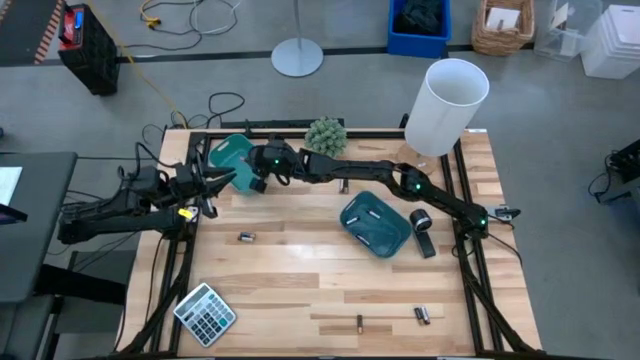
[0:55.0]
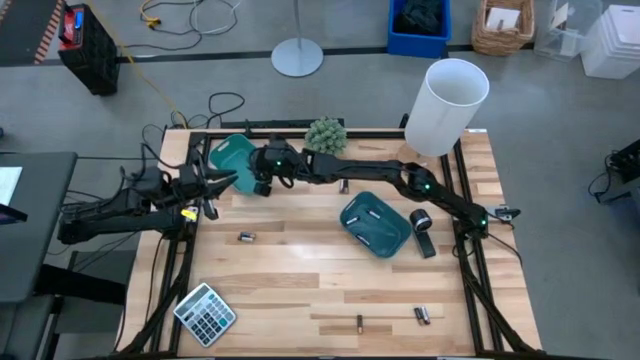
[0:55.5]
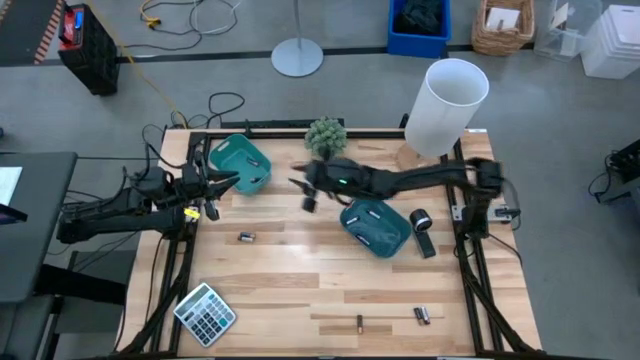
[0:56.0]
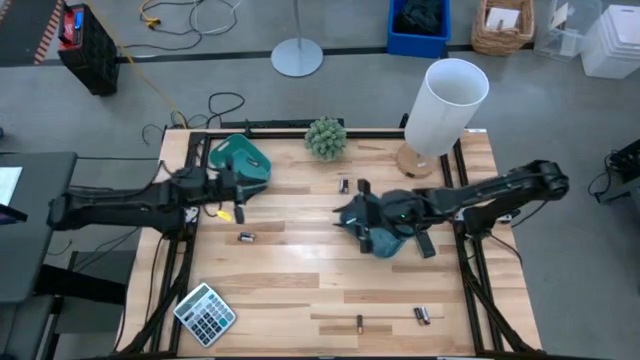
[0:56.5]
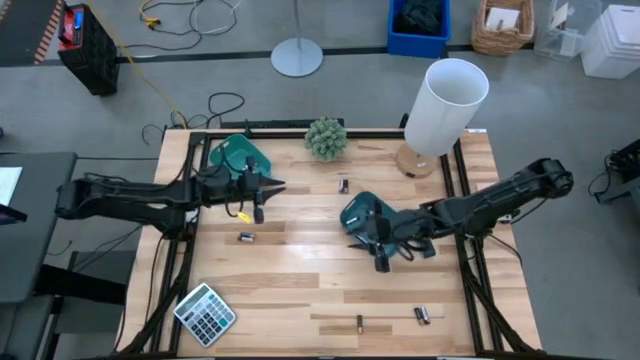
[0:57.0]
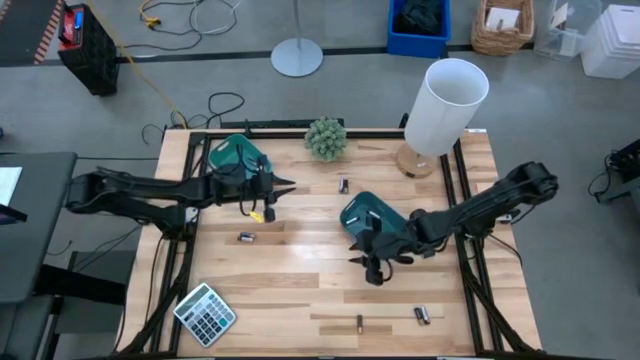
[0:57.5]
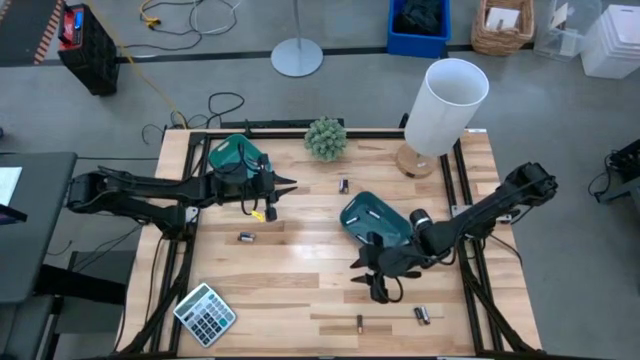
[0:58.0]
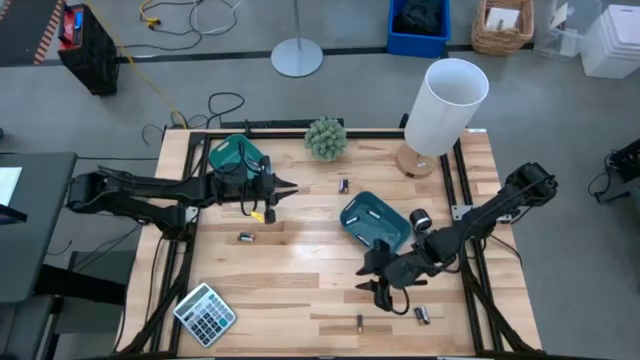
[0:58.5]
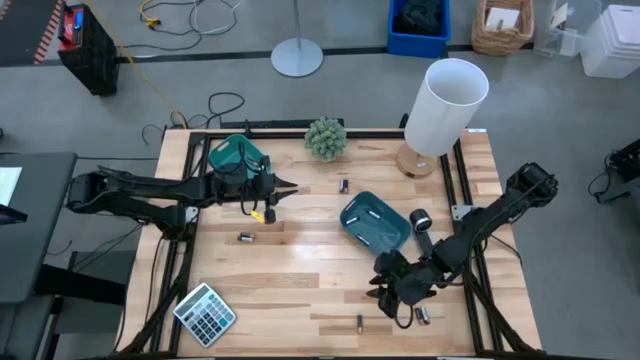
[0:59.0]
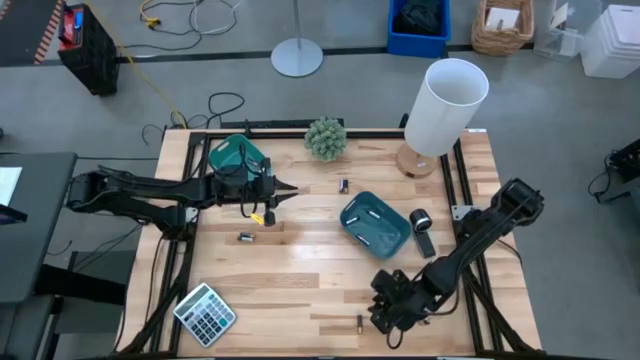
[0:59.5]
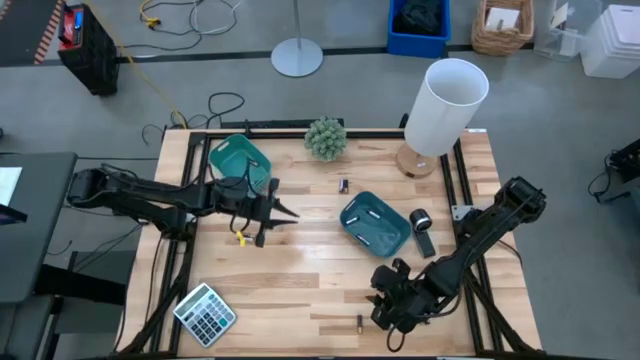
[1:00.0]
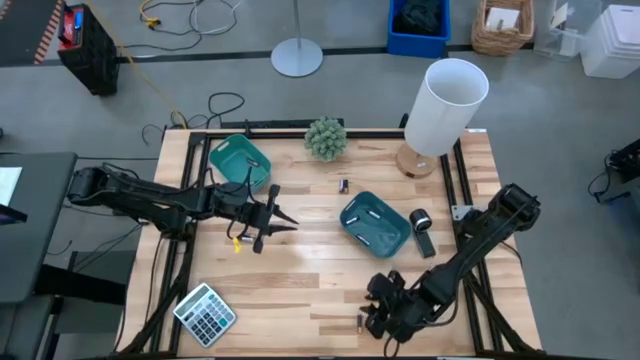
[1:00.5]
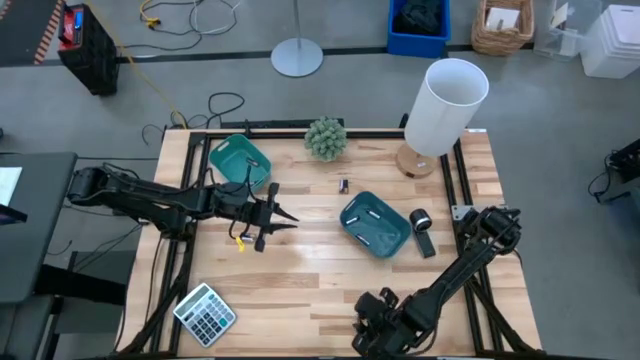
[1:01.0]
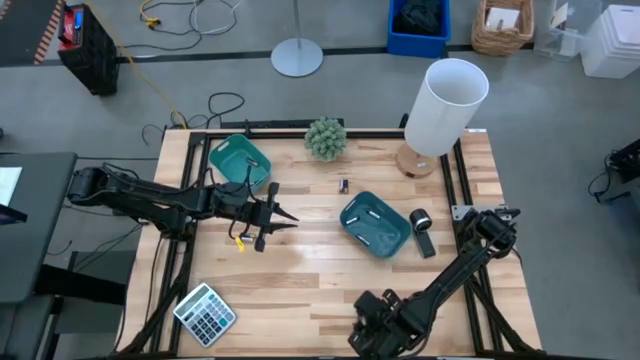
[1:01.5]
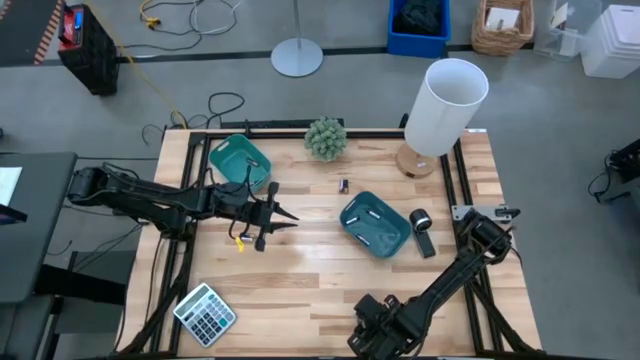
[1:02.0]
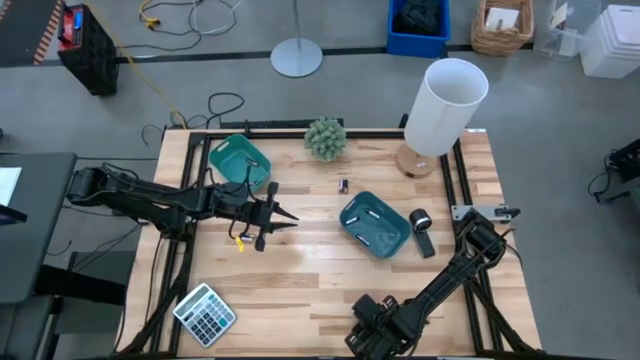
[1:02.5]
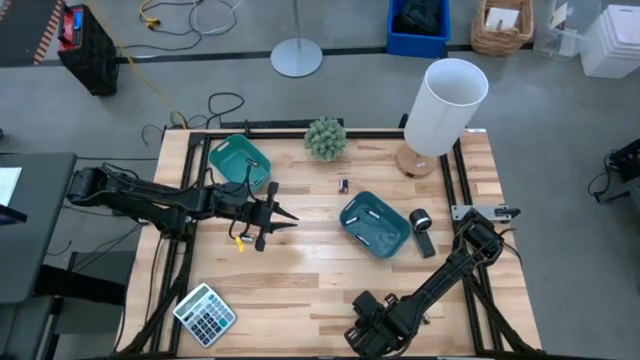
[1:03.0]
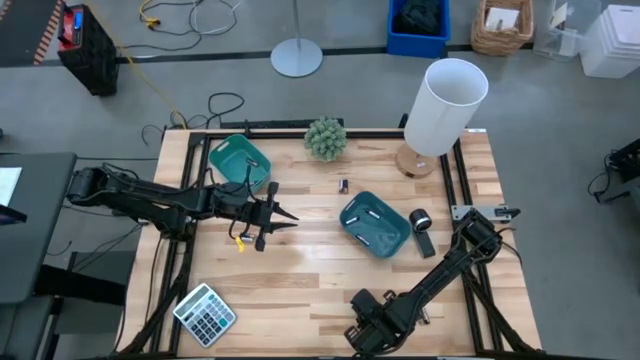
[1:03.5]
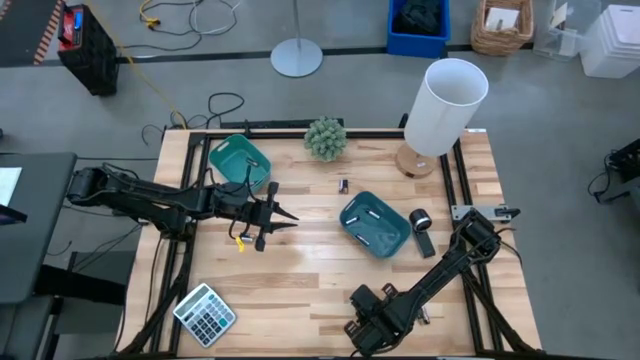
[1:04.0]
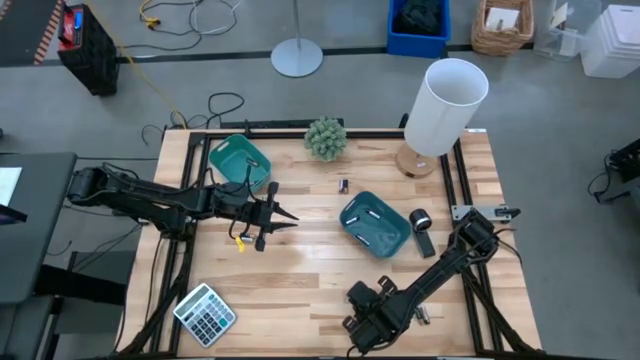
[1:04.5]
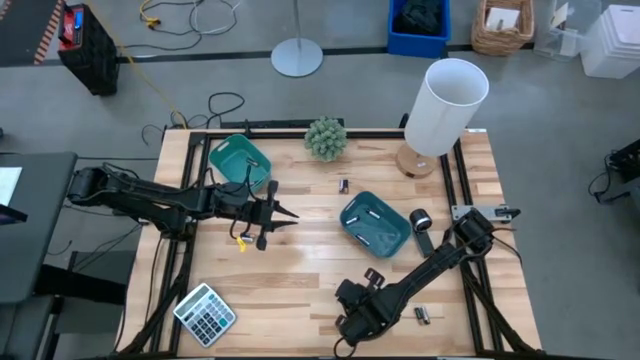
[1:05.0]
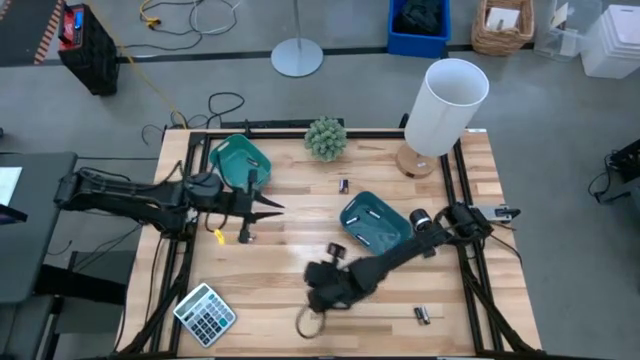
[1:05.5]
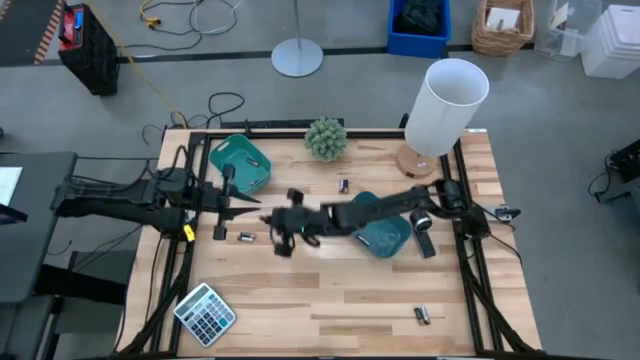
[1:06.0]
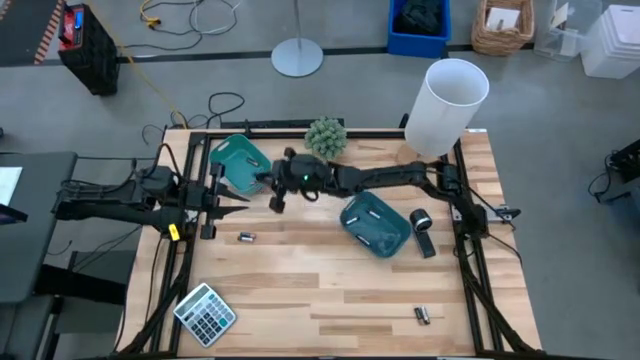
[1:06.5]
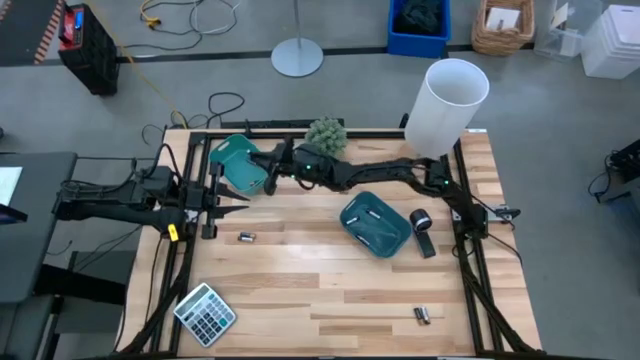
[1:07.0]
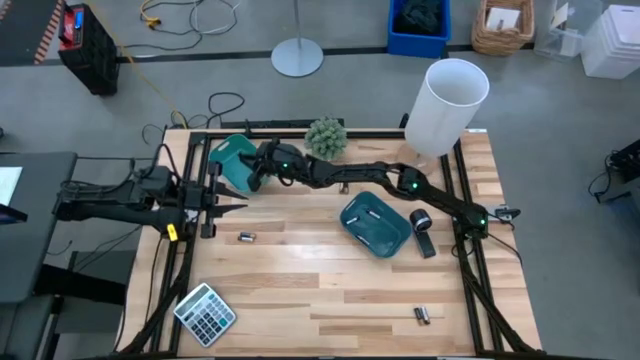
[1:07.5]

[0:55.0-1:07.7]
Task: Sort batteries
Put the black battery into the green bin

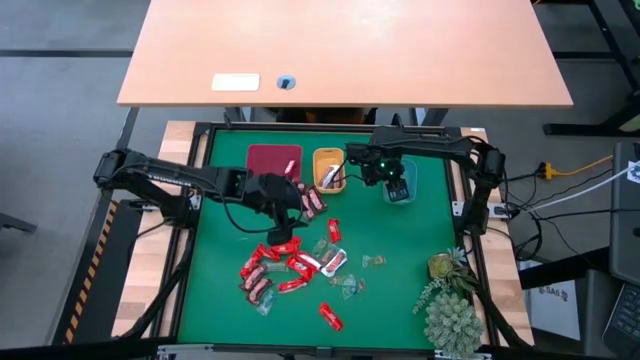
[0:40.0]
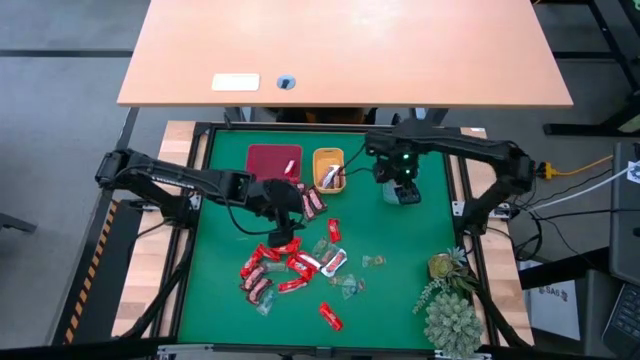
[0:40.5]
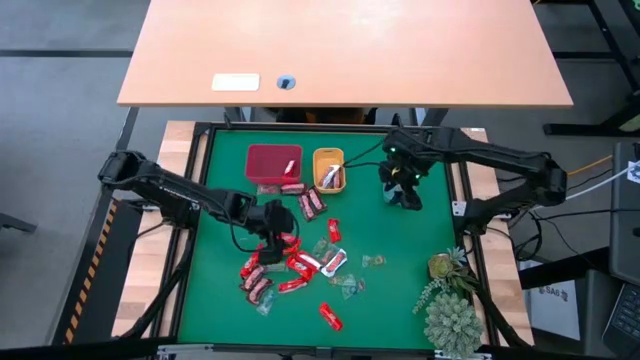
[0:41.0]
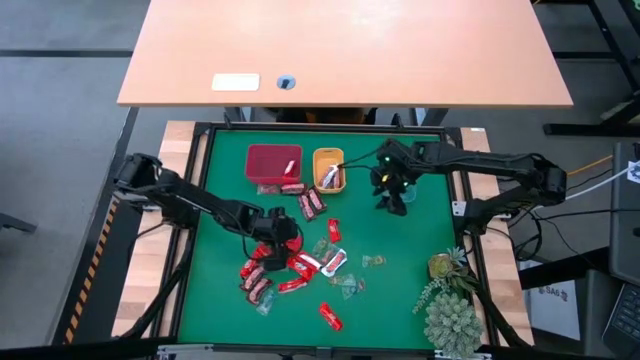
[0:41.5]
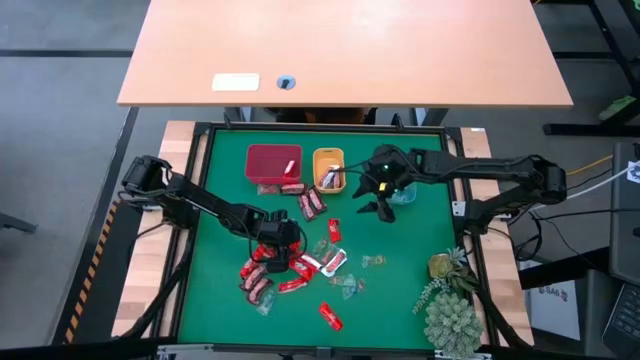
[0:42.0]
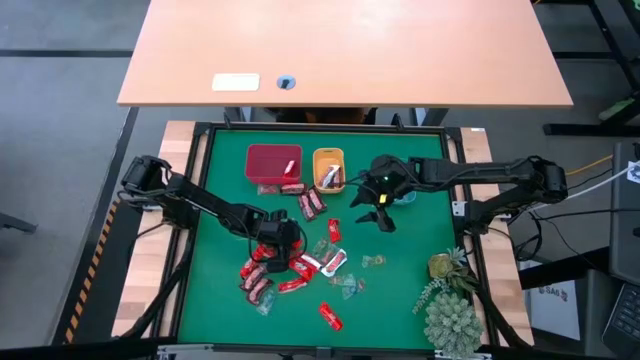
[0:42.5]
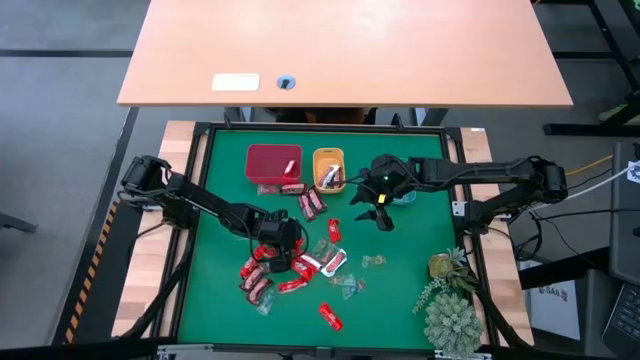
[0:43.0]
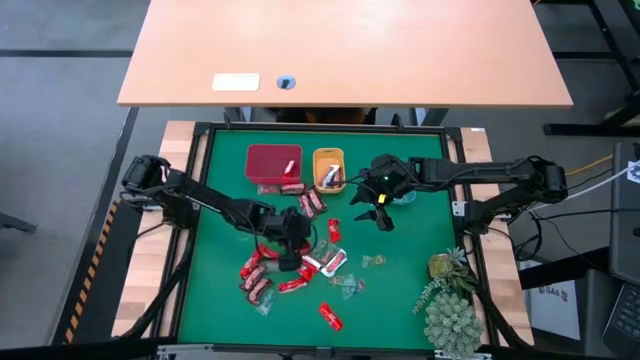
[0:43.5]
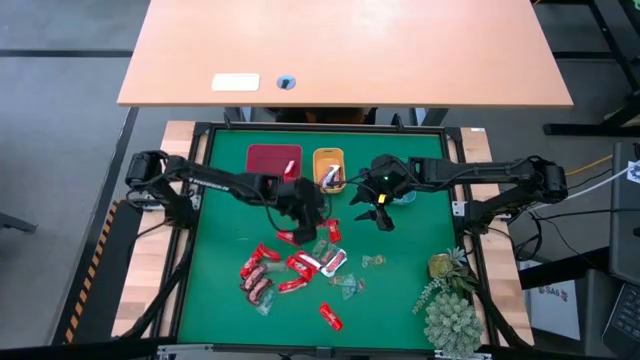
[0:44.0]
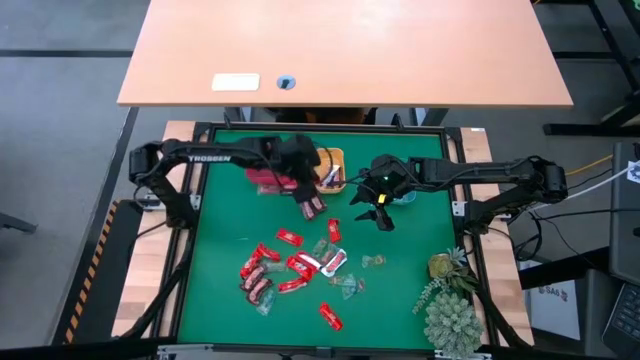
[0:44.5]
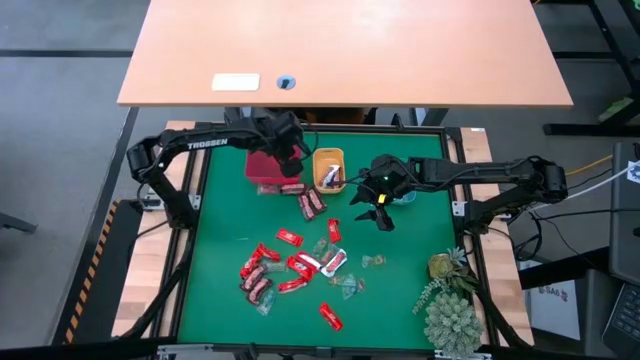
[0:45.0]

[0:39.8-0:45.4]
Task: Sort candy
Put the red chocolate bar into the red bin

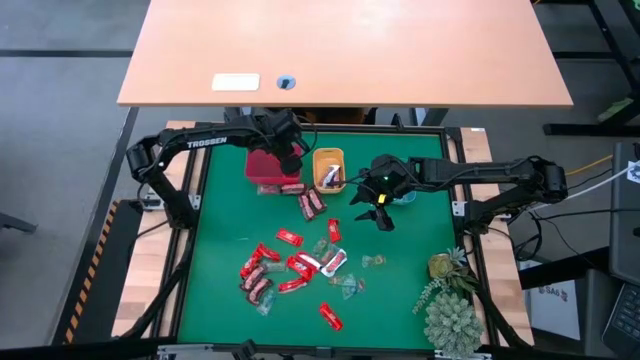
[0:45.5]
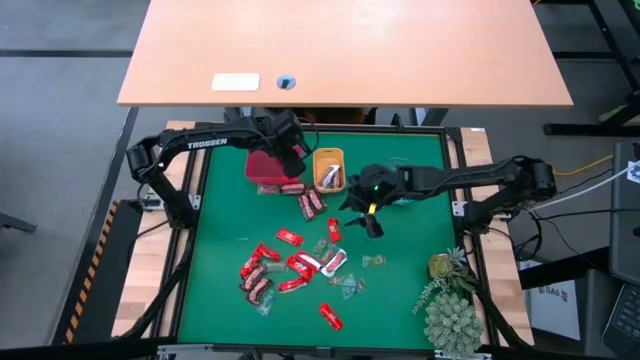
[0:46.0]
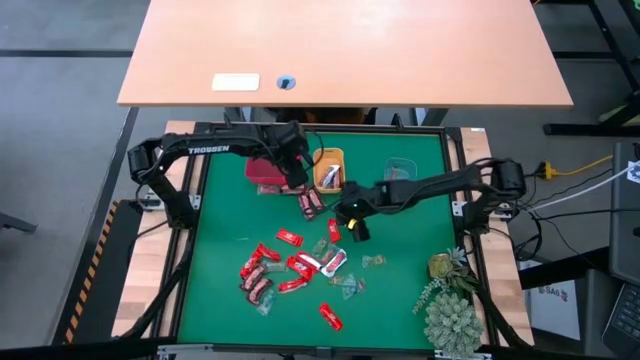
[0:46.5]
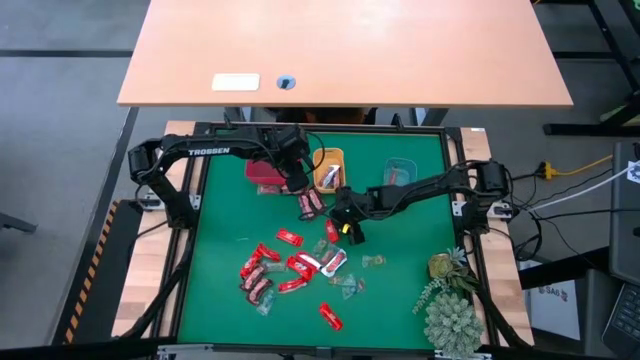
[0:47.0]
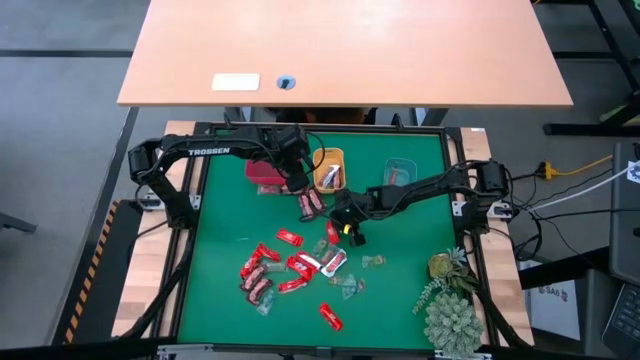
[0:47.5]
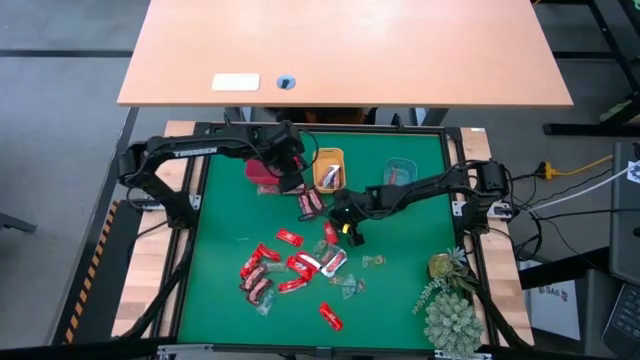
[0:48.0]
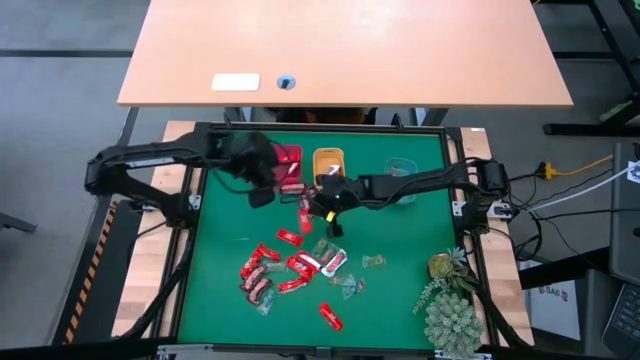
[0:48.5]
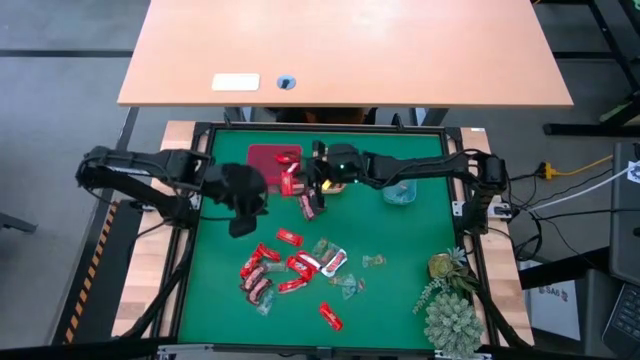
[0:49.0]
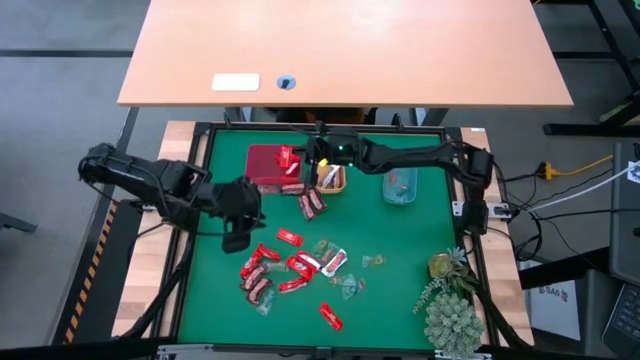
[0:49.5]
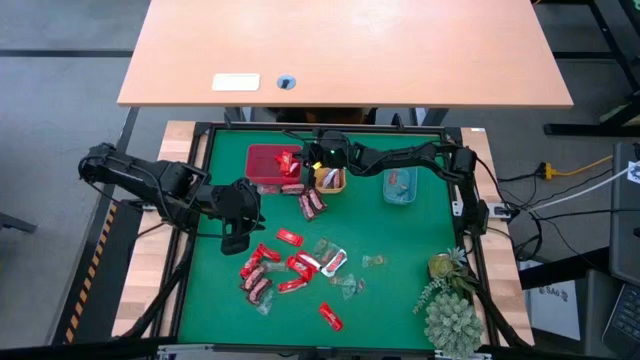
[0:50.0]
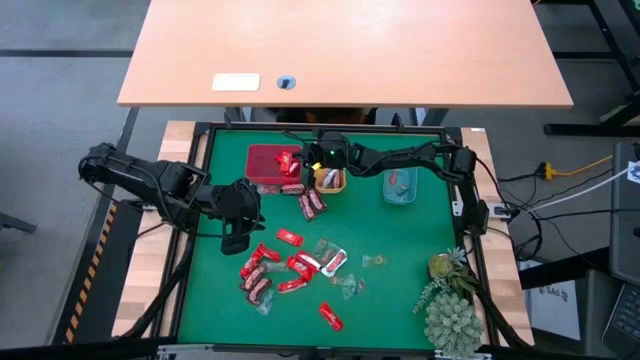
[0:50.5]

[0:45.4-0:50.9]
Put the red chocolate bar into the red bin
